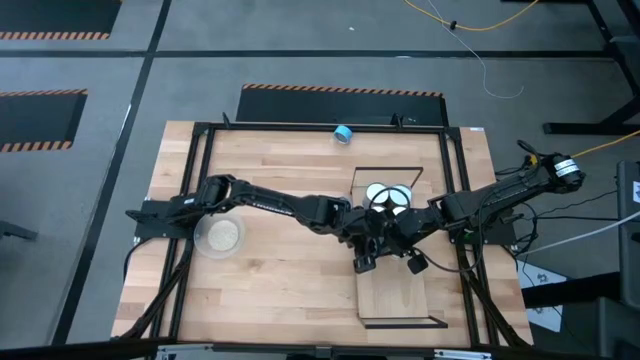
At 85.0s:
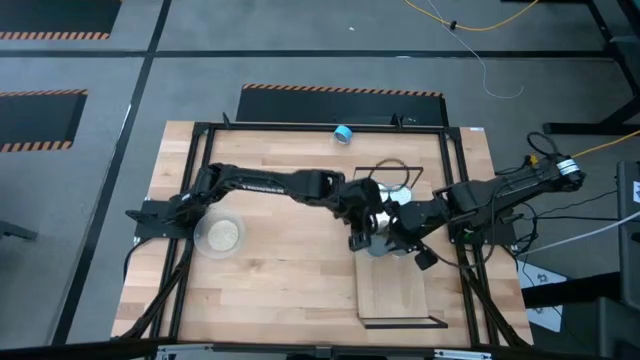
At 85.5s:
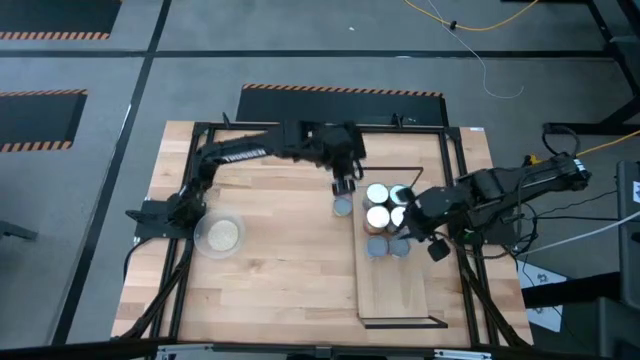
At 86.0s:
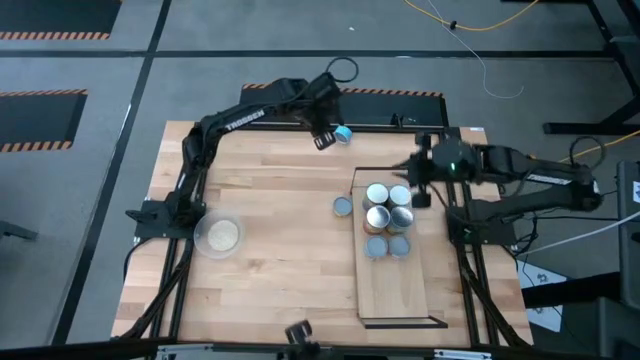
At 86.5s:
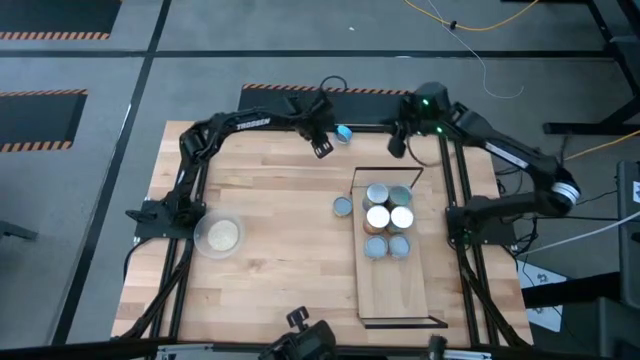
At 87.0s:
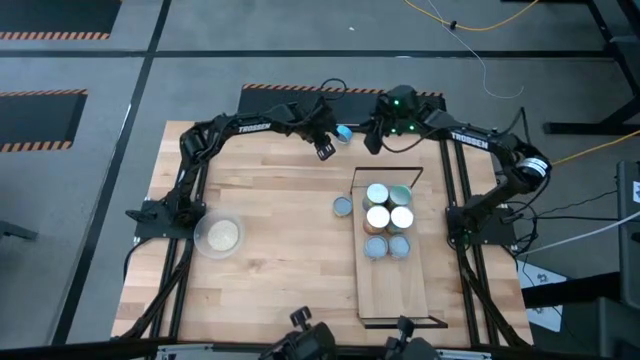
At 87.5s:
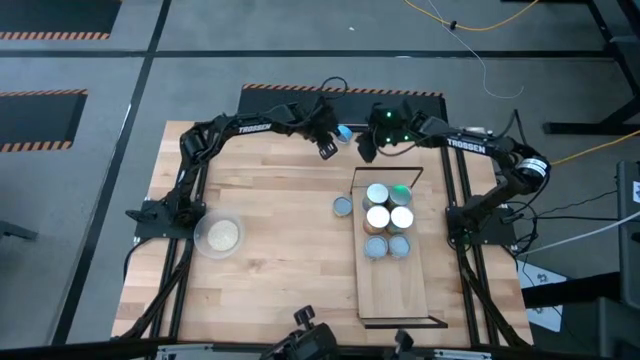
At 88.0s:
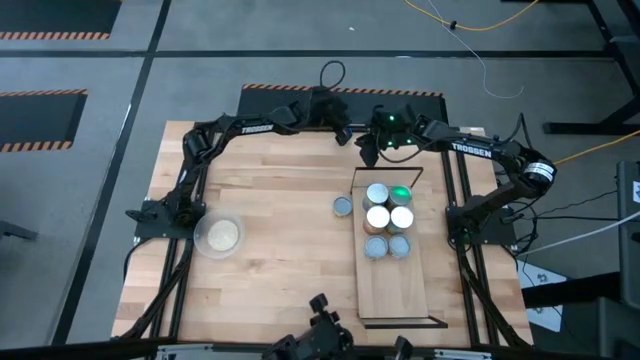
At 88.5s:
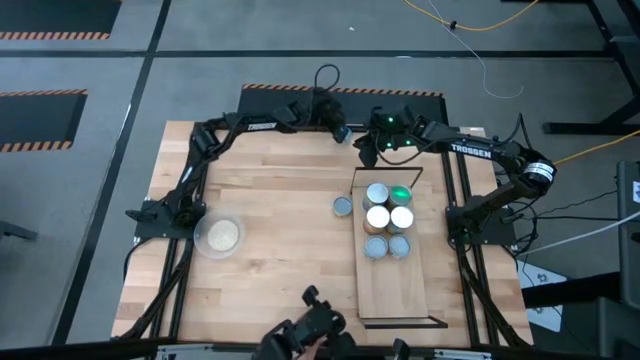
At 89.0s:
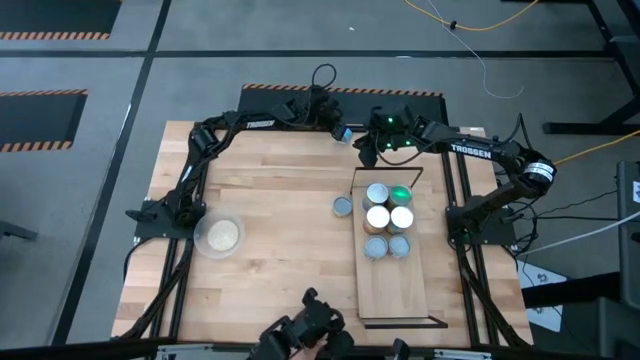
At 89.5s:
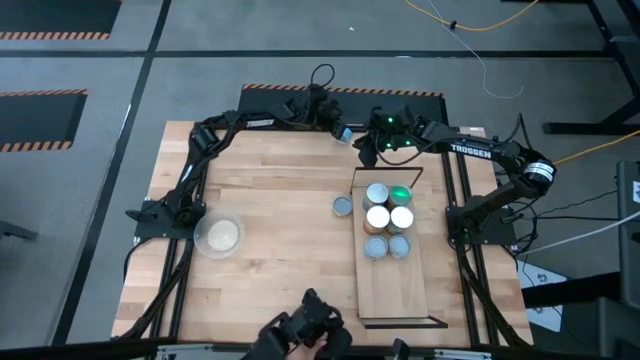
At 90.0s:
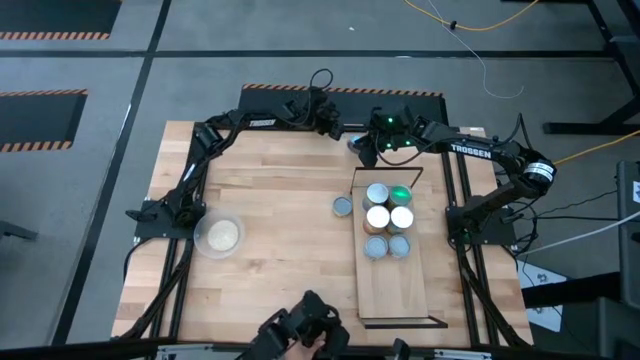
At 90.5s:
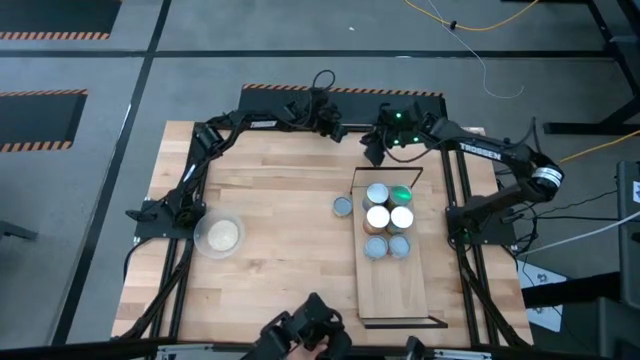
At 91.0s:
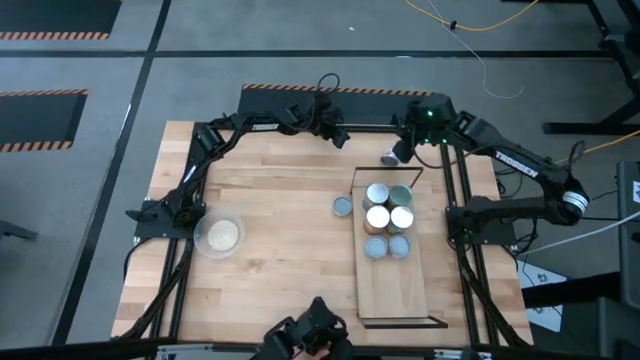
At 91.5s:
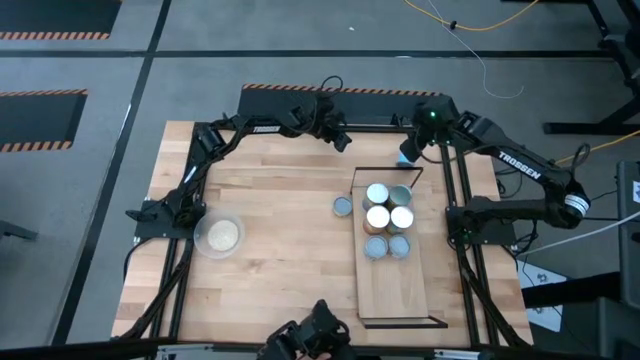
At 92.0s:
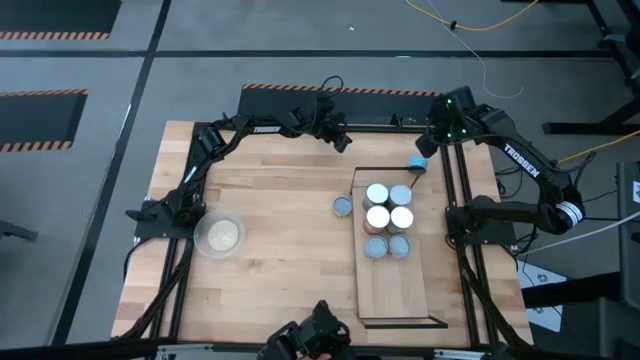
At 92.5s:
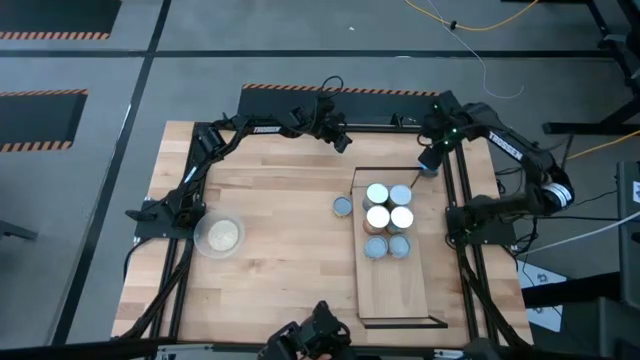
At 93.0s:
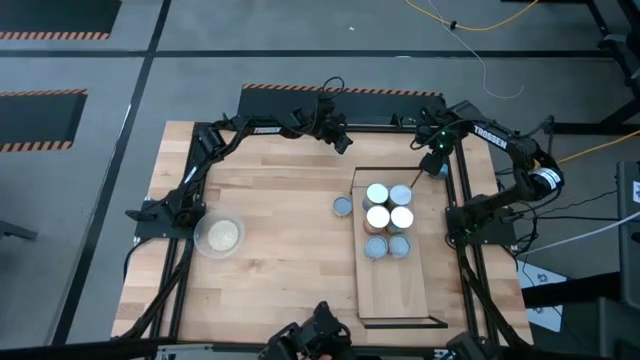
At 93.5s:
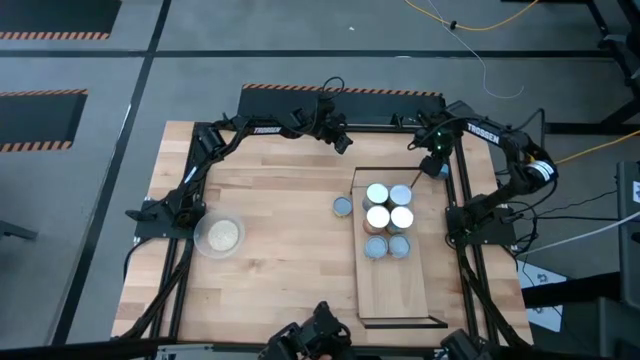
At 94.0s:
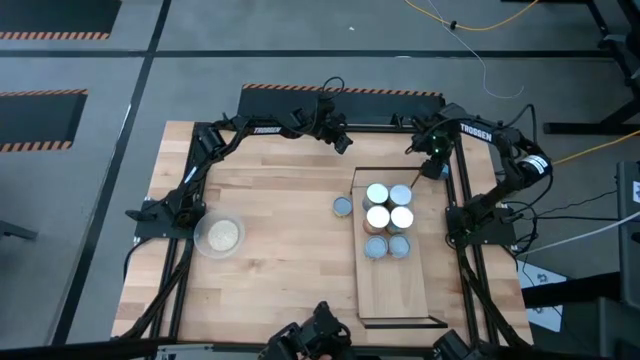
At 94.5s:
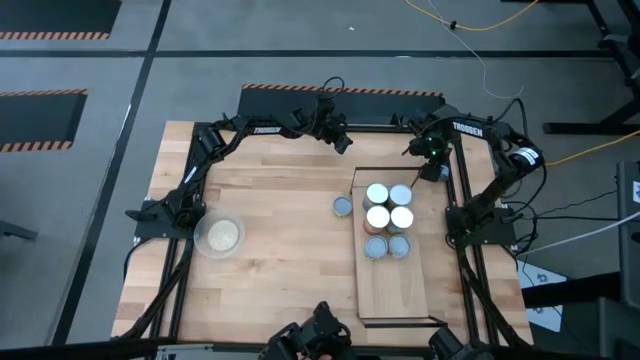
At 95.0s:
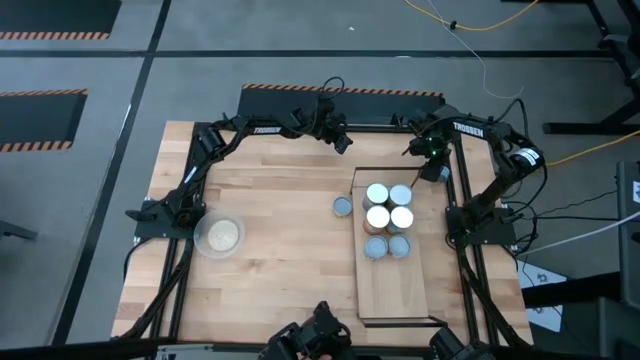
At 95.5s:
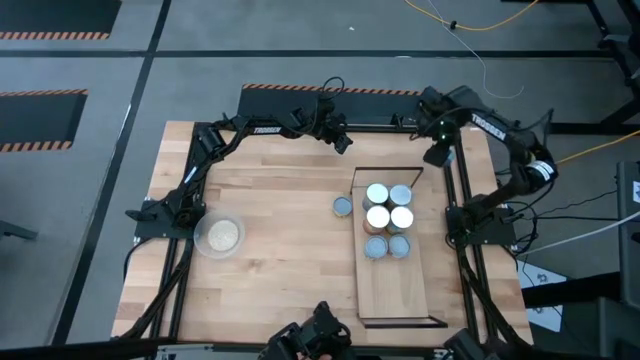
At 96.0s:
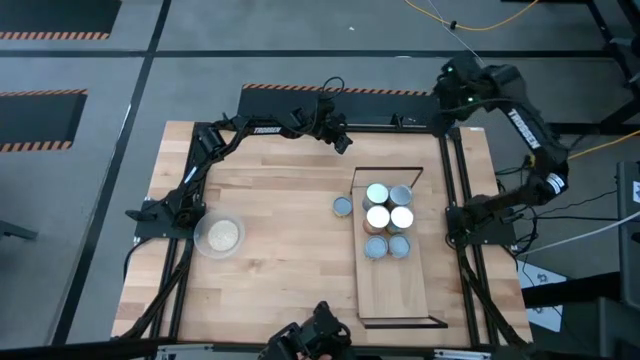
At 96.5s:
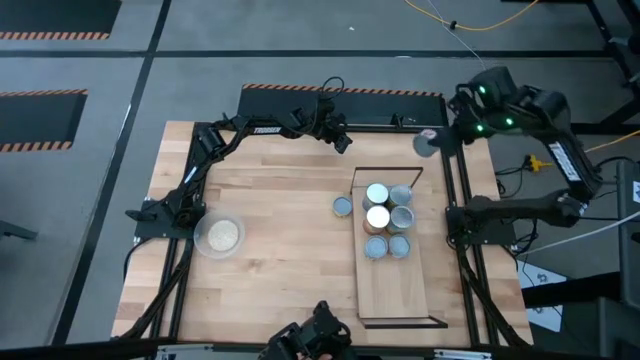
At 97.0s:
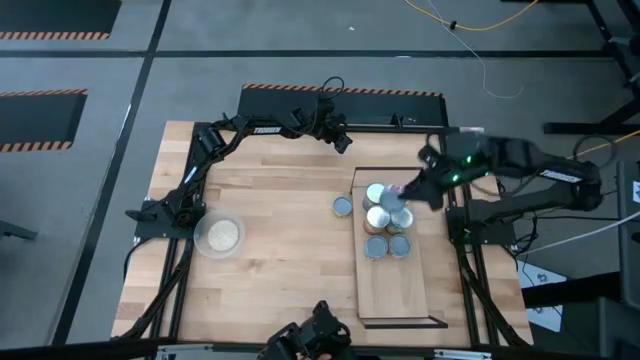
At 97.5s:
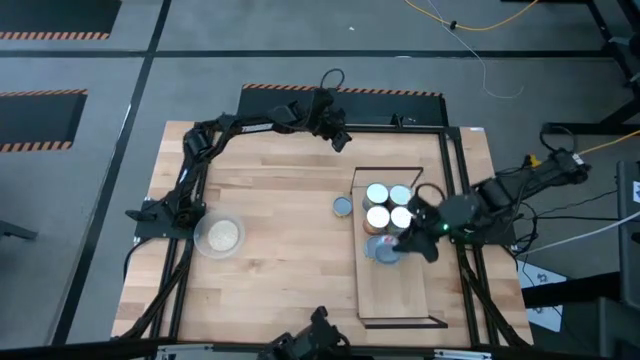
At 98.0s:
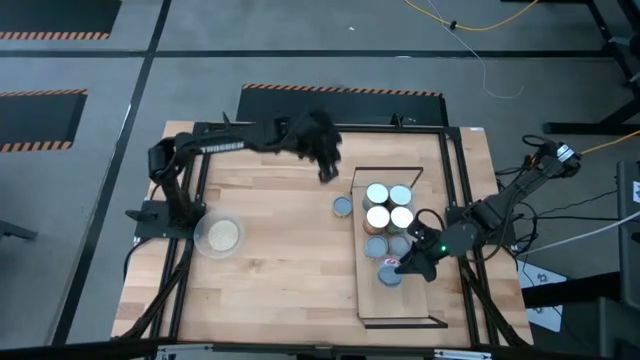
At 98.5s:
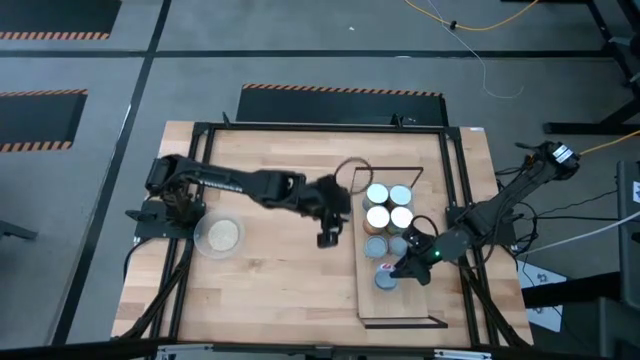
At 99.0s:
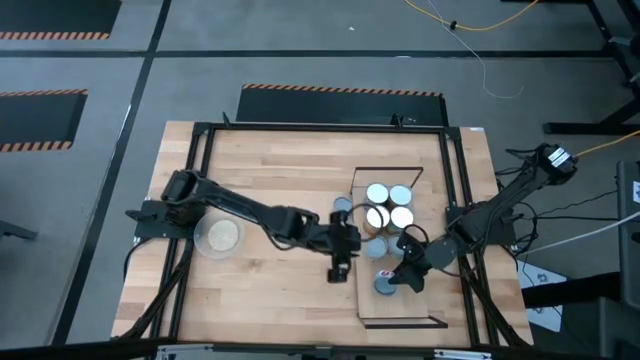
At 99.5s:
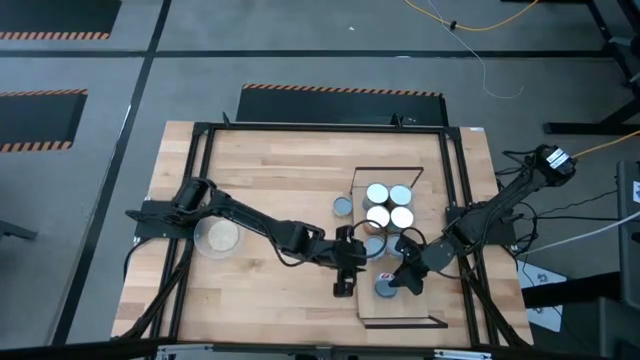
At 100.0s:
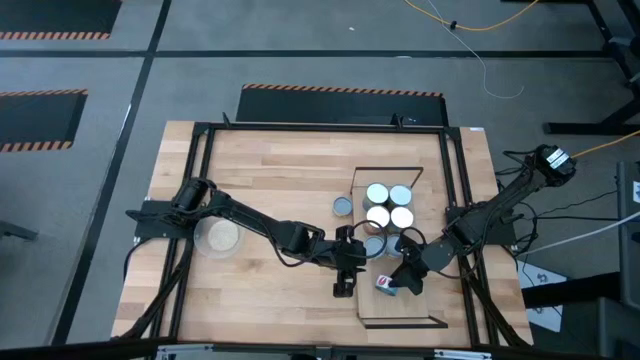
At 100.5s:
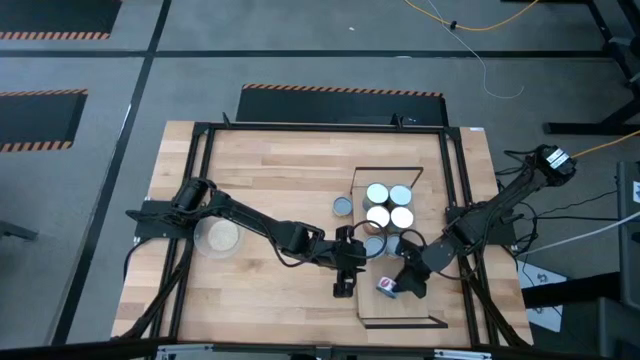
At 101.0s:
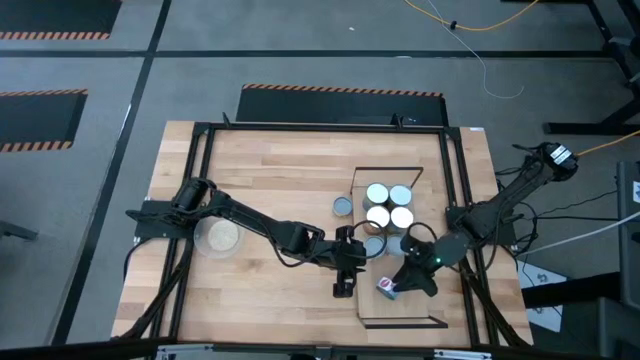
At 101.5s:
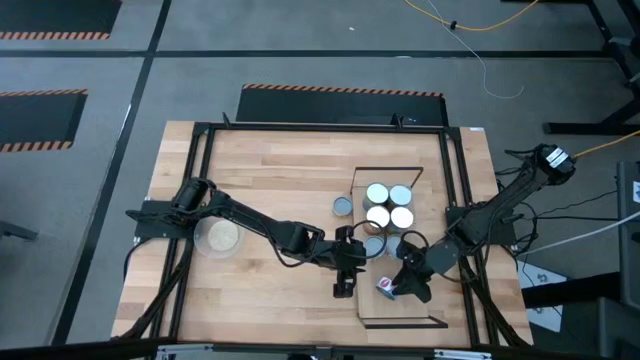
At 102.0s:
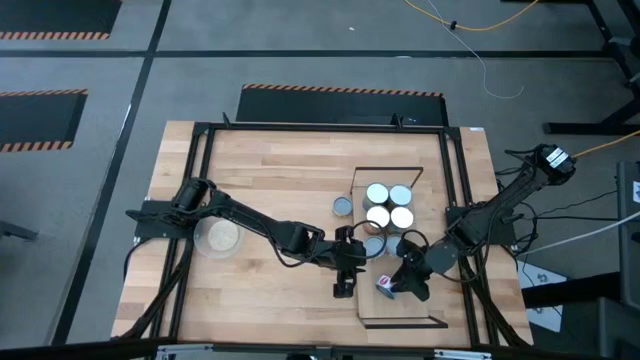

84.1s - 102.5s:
Task: Pick and place cans onto a shelf
Put the blue tuna can onto the shelf
